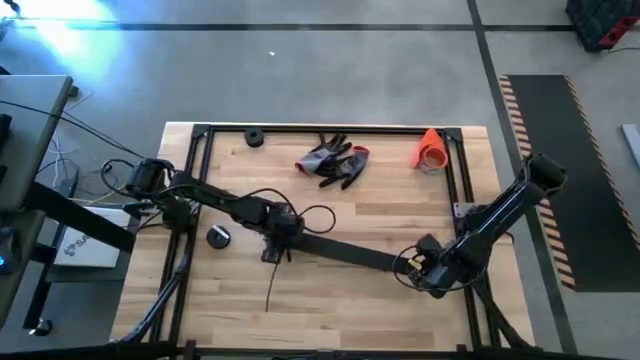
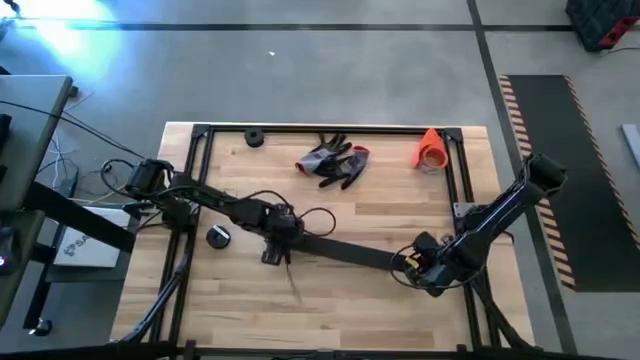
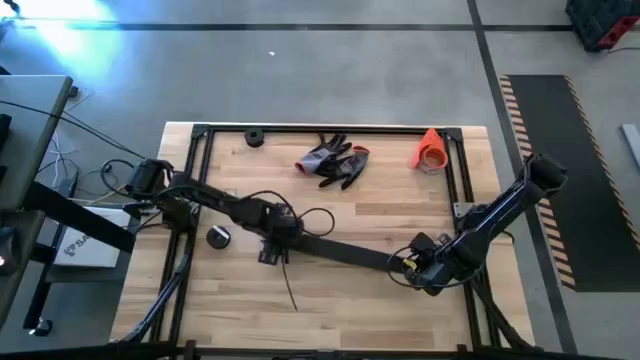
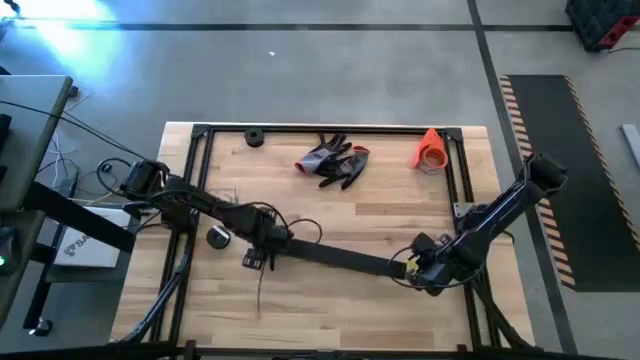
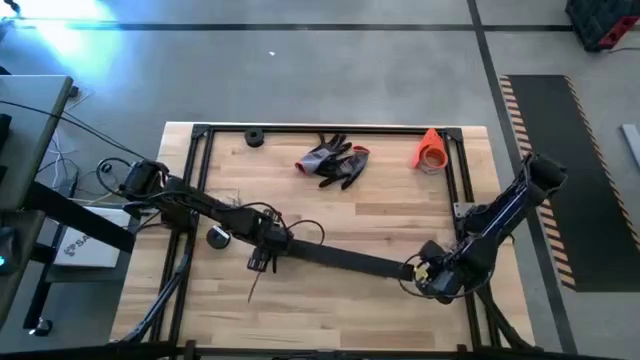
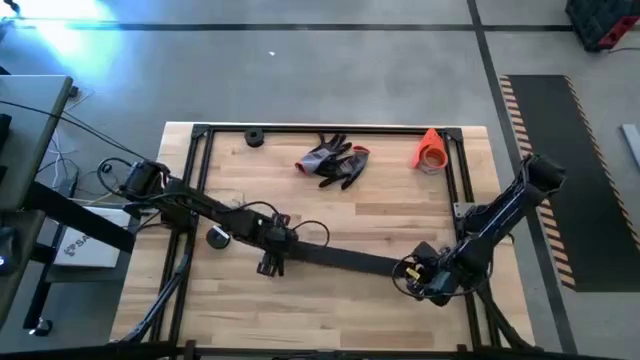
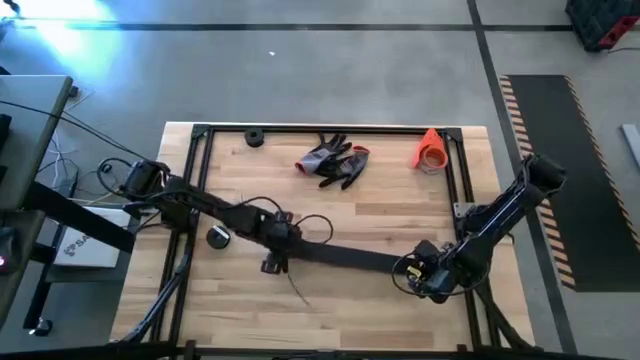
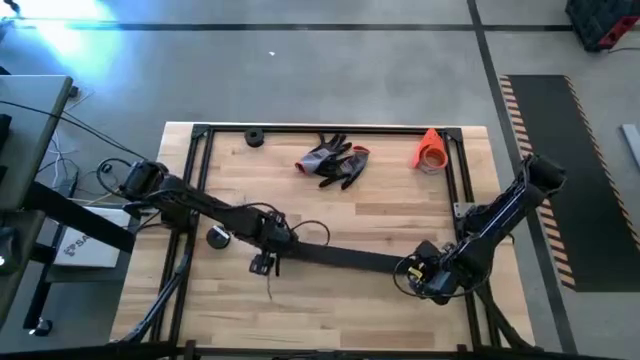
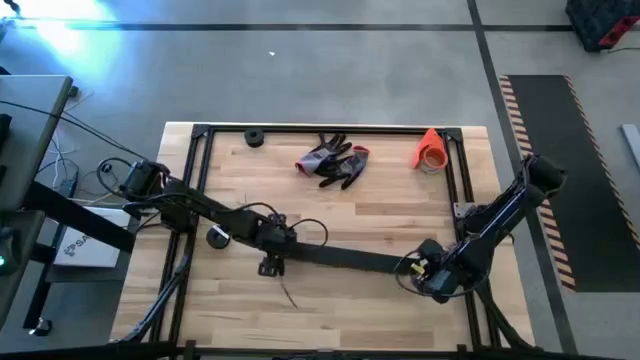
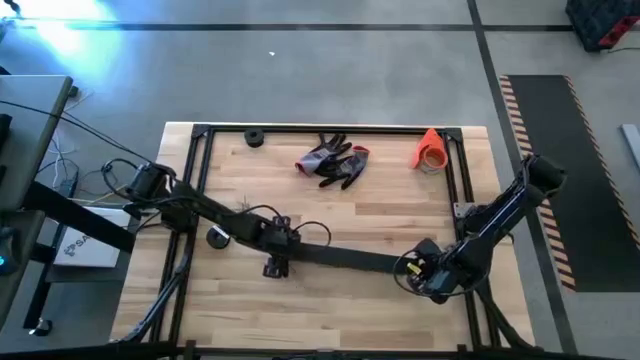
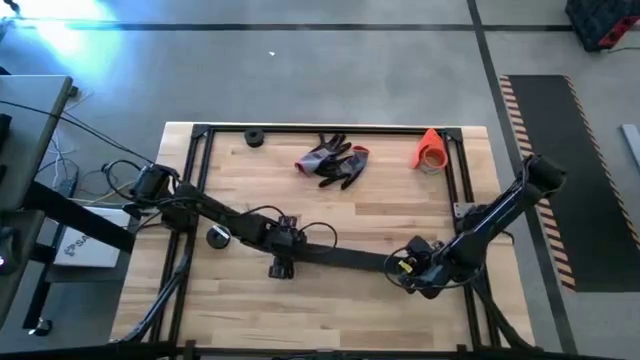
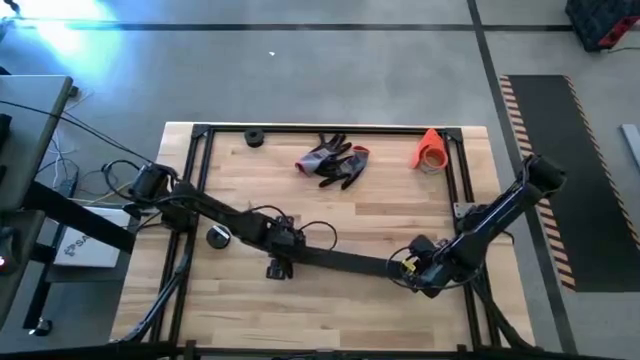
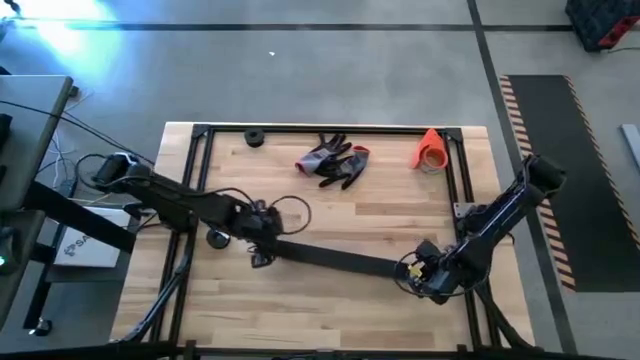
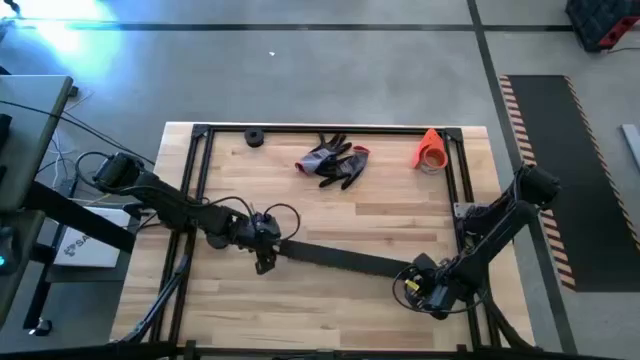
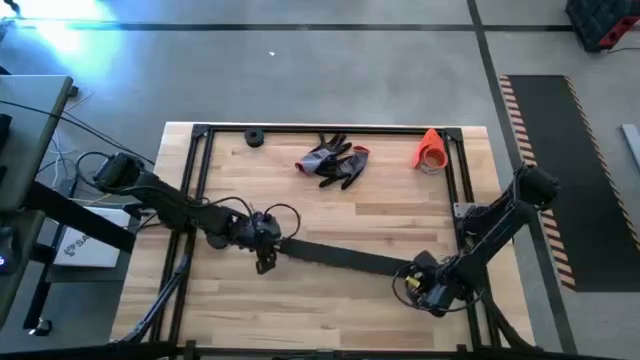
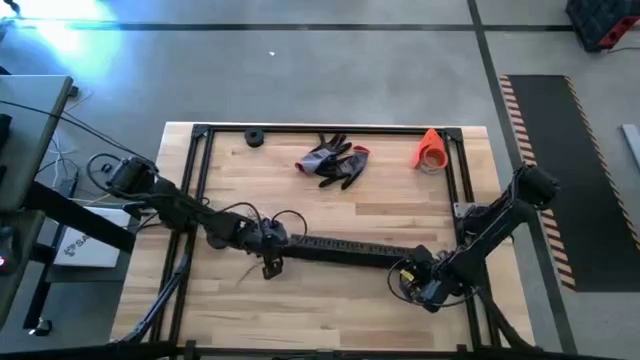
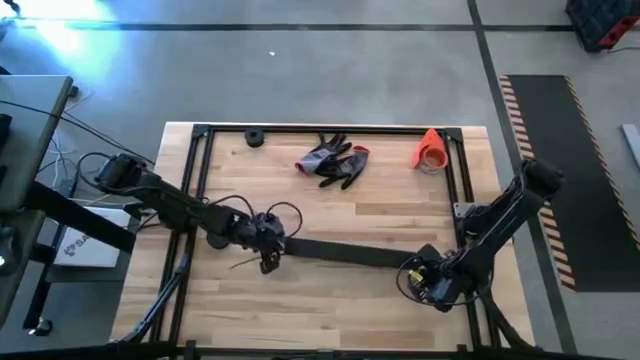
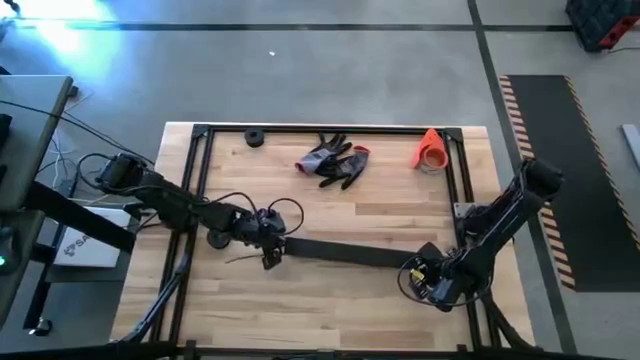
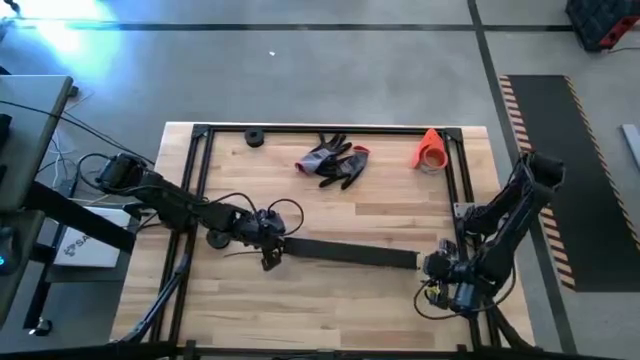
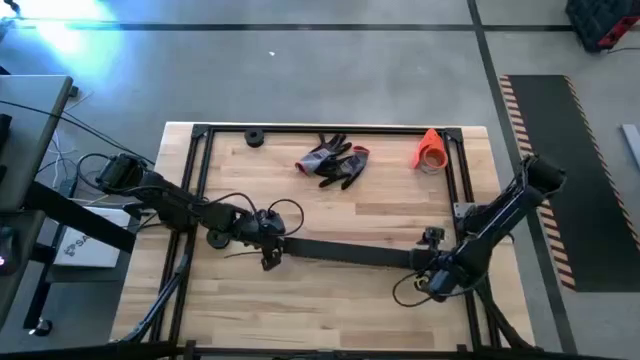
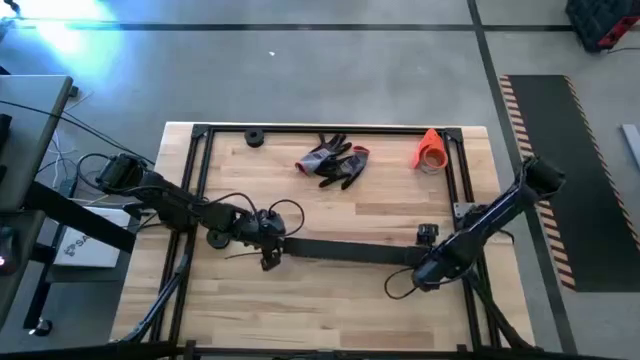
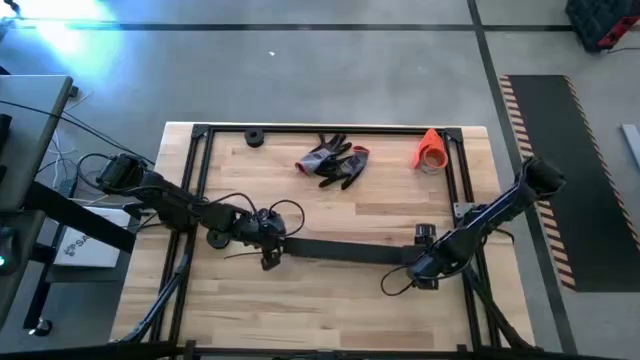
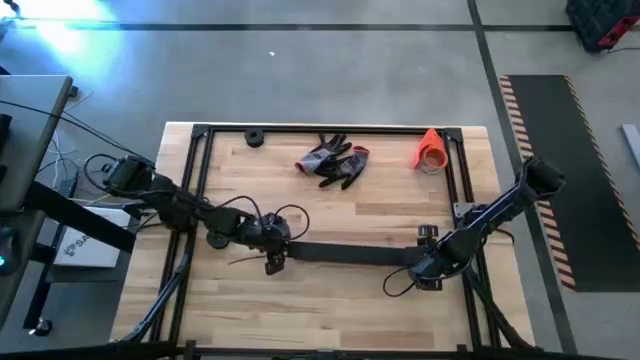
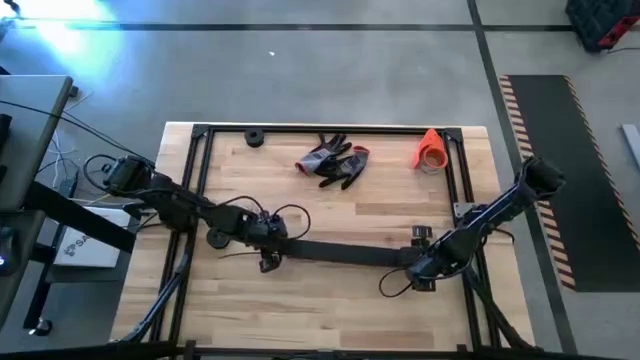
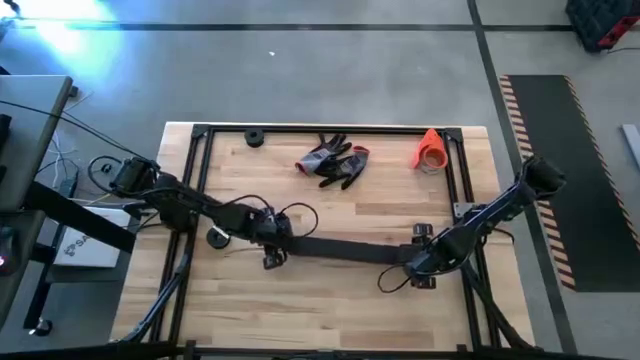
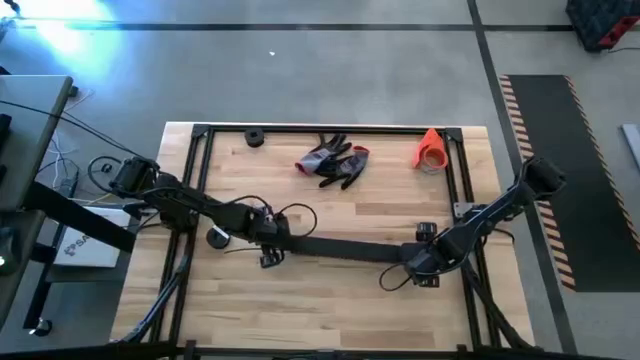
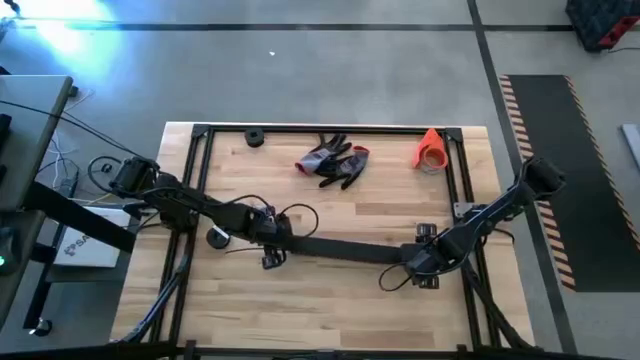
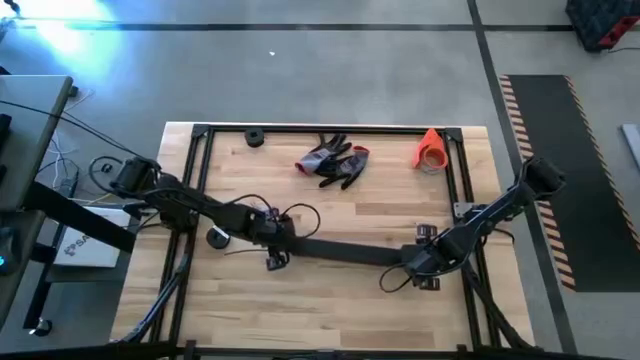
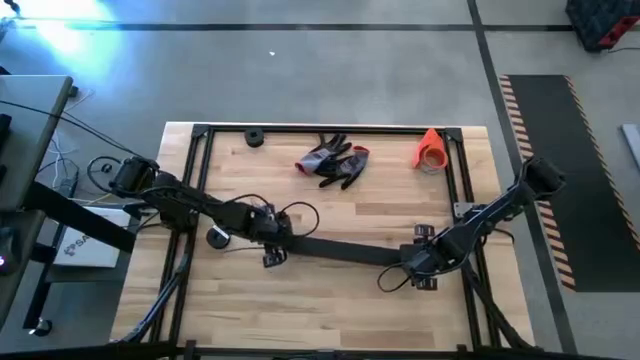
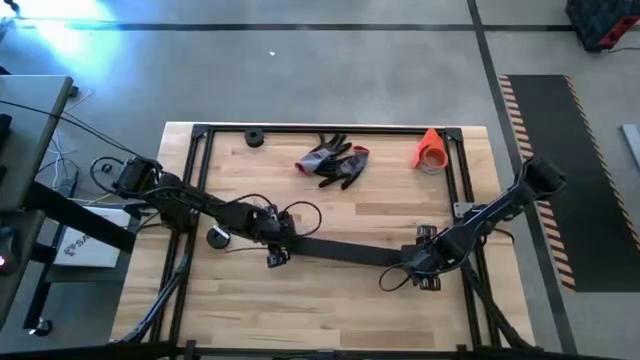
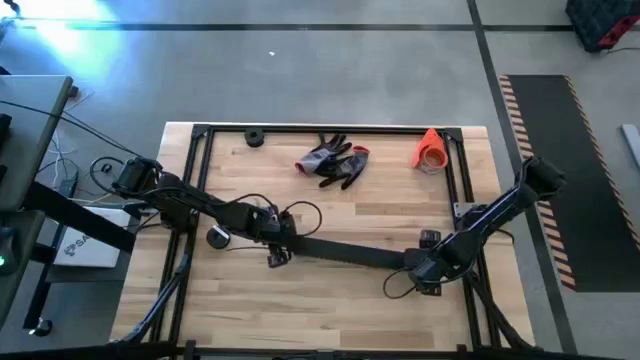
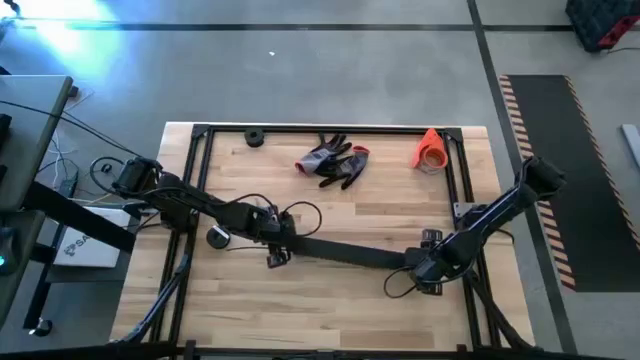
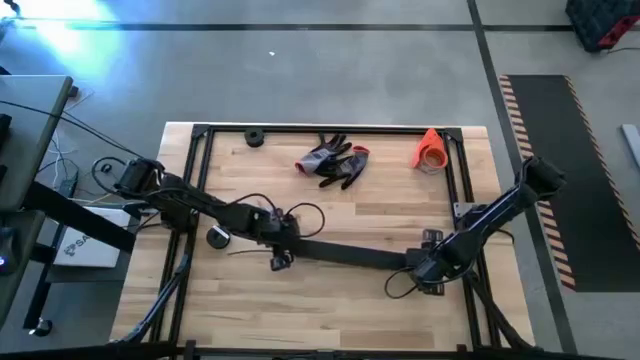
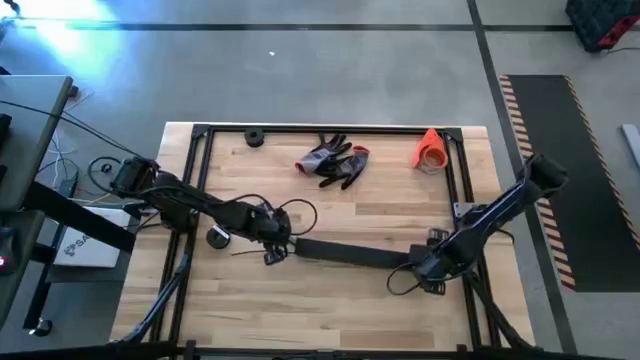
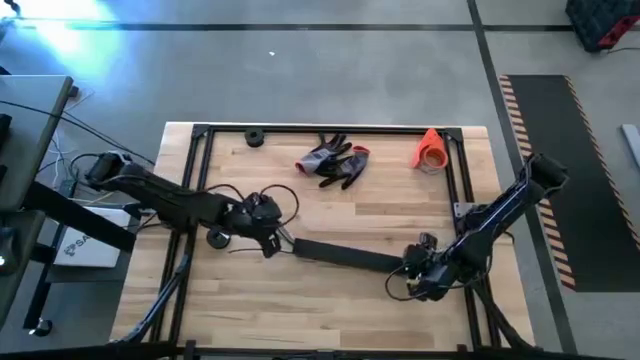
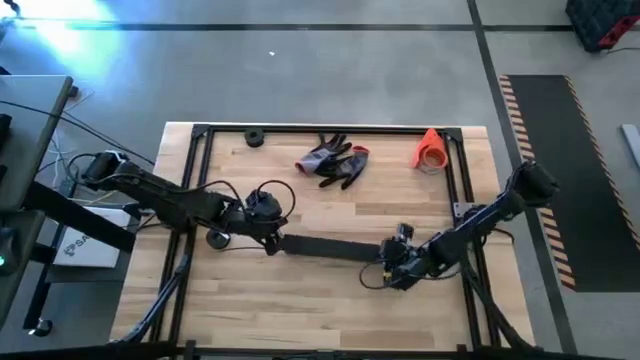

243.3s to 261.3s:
Task: Ziptie cables
Close the black cable duct

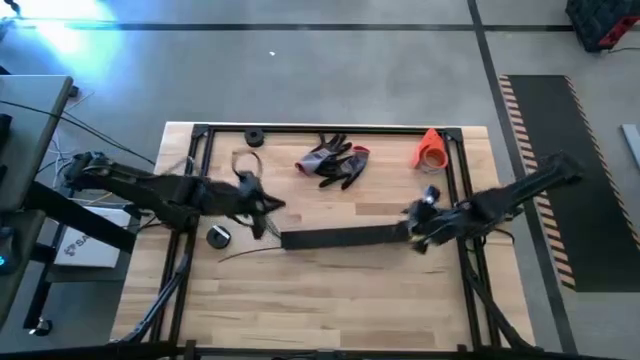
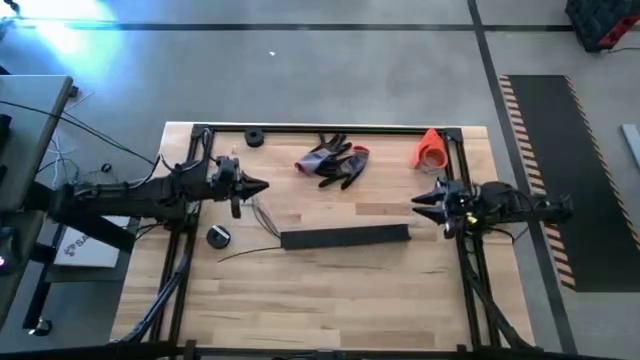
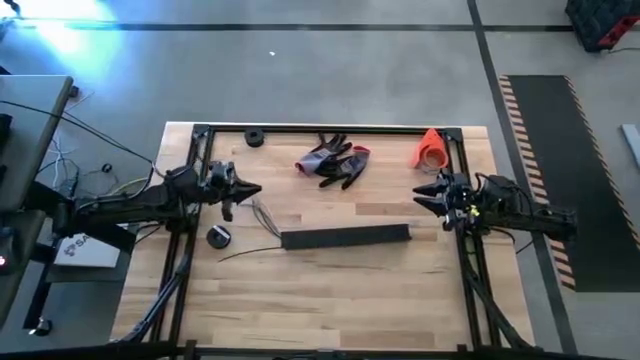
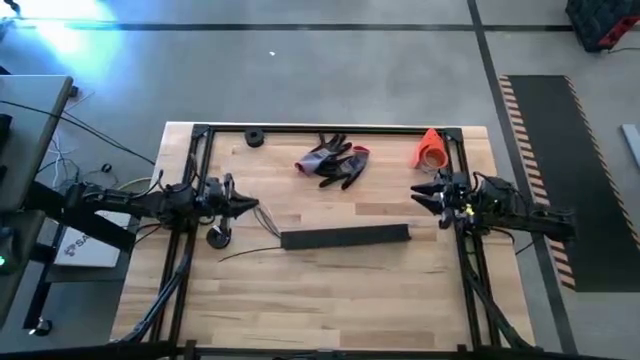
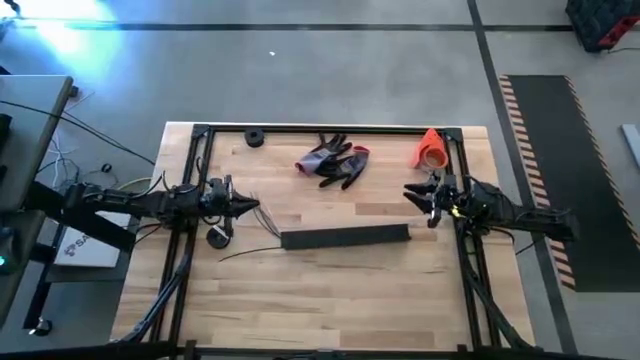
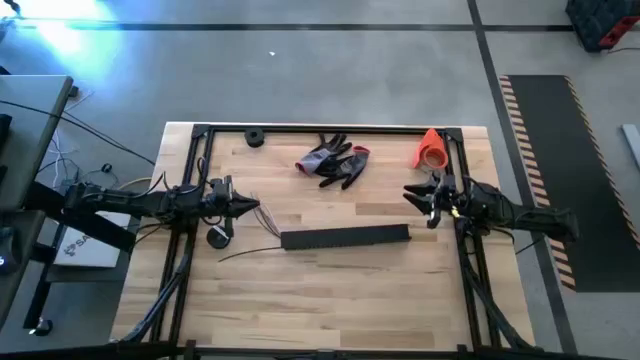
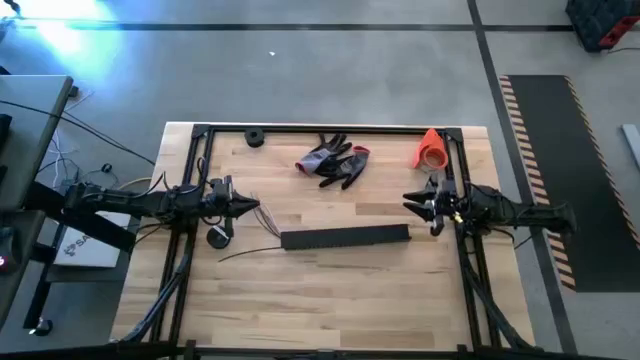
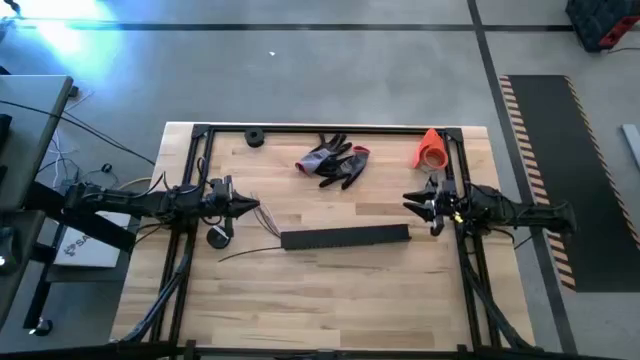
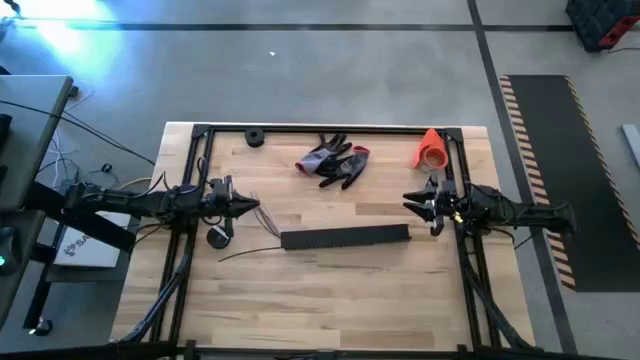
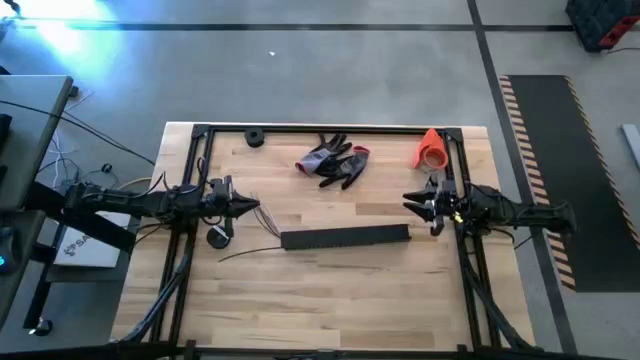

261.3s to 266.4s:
Return to Home Position
